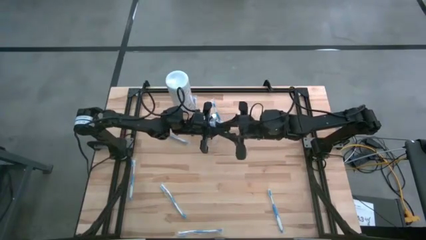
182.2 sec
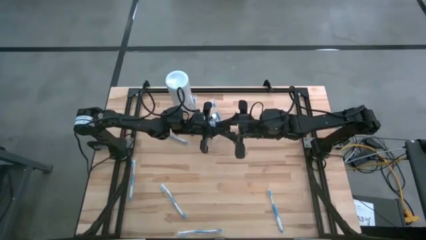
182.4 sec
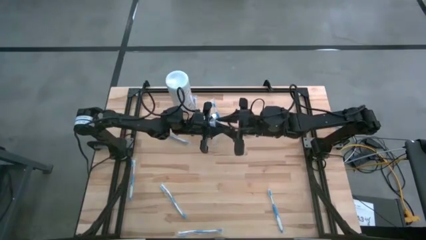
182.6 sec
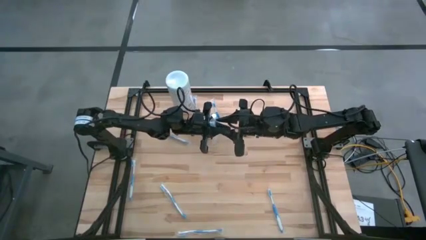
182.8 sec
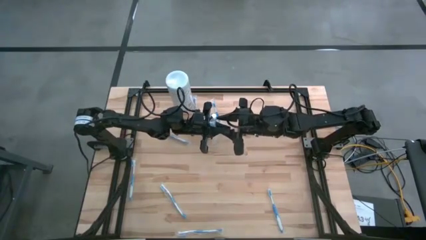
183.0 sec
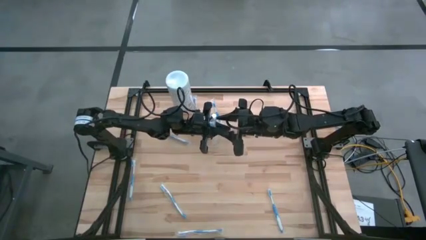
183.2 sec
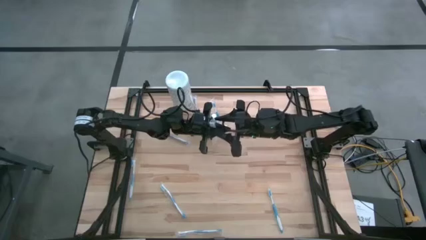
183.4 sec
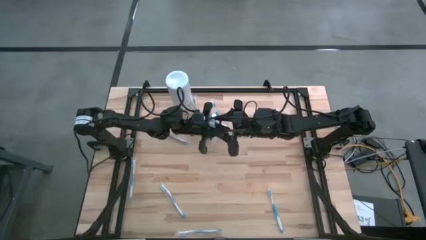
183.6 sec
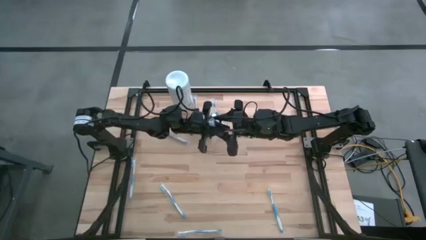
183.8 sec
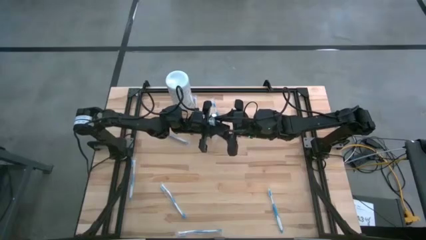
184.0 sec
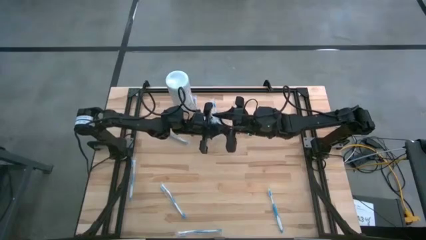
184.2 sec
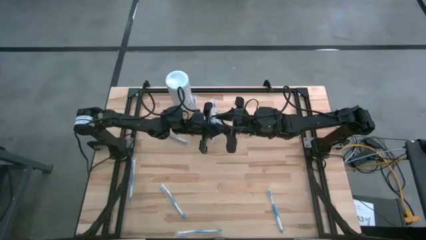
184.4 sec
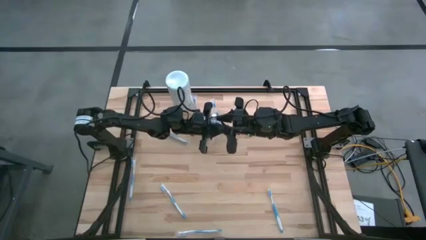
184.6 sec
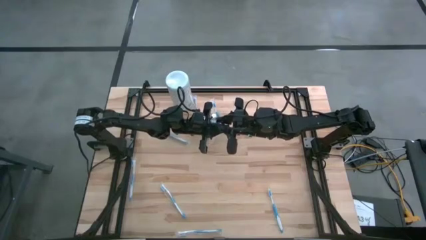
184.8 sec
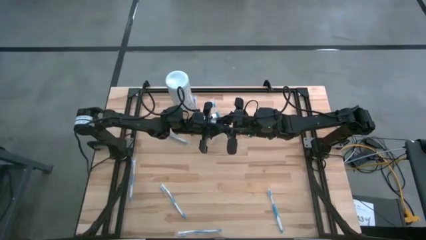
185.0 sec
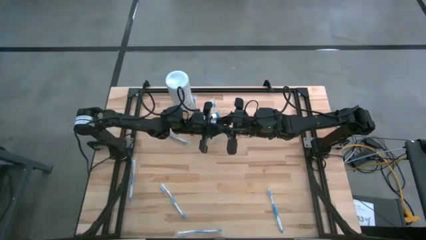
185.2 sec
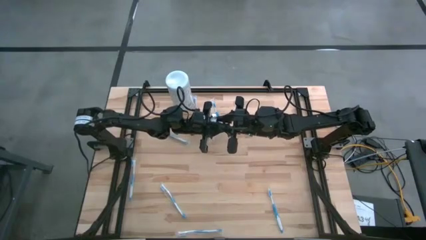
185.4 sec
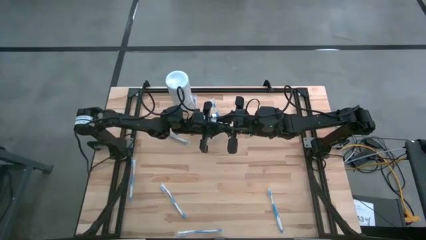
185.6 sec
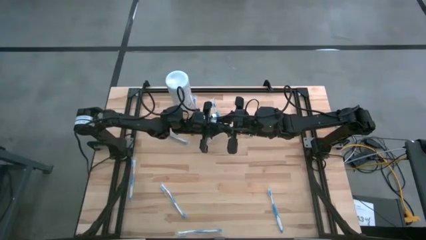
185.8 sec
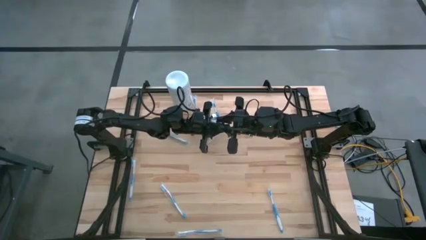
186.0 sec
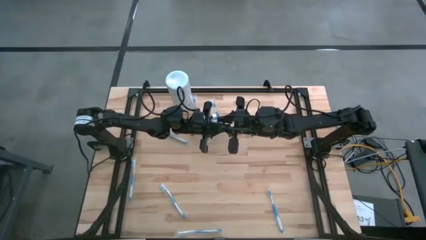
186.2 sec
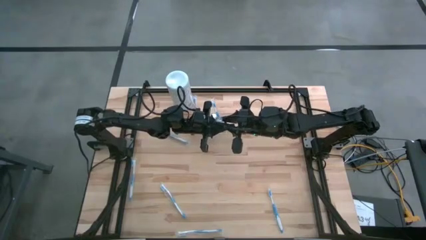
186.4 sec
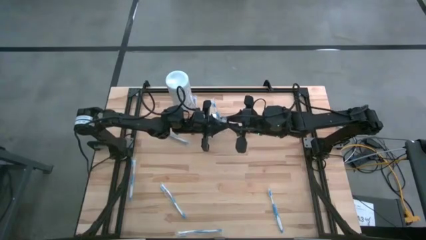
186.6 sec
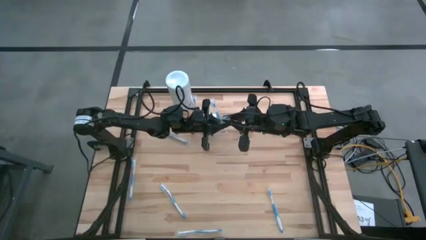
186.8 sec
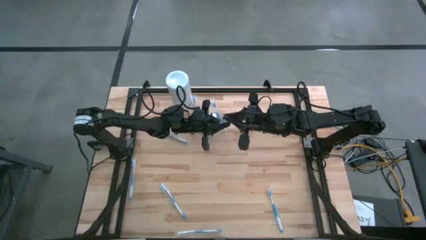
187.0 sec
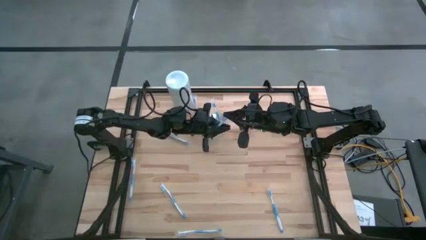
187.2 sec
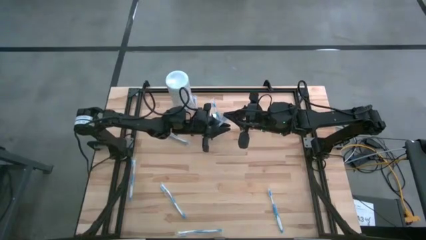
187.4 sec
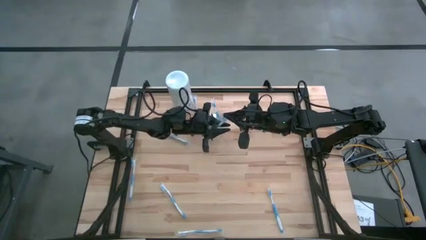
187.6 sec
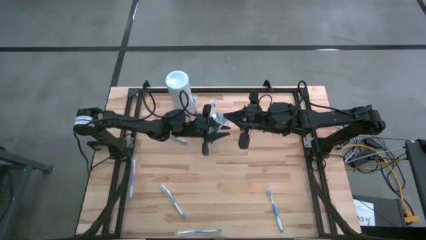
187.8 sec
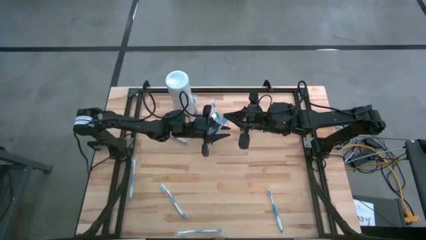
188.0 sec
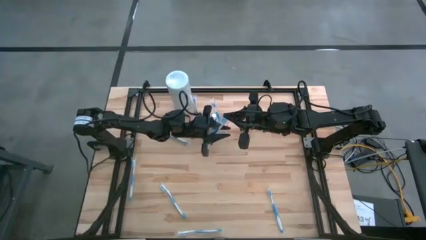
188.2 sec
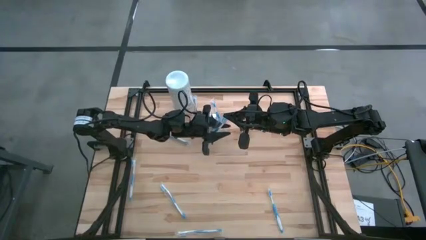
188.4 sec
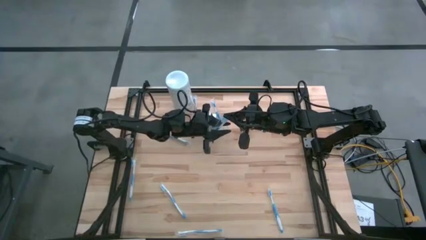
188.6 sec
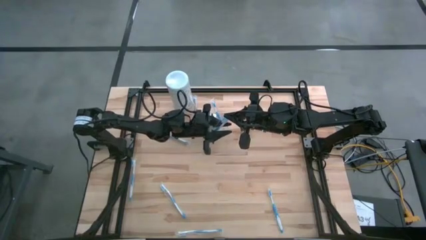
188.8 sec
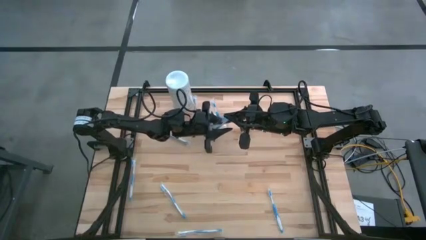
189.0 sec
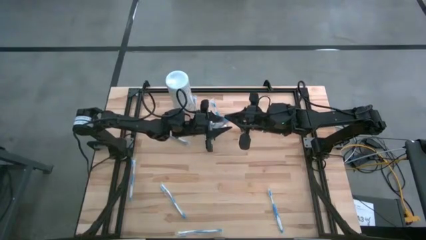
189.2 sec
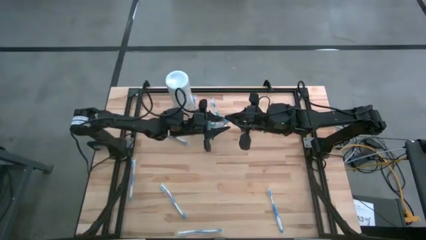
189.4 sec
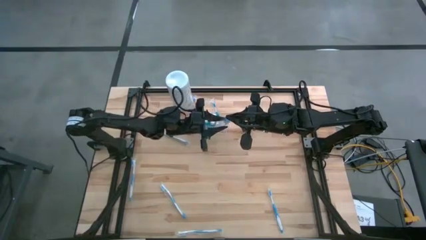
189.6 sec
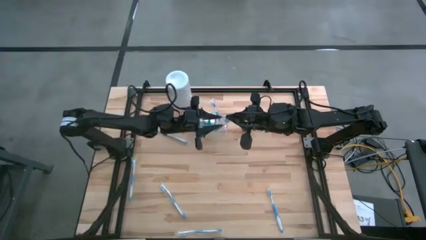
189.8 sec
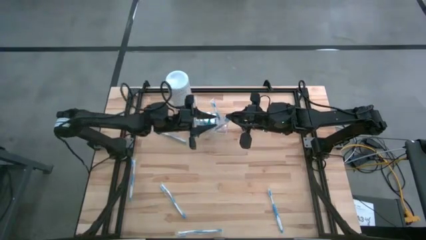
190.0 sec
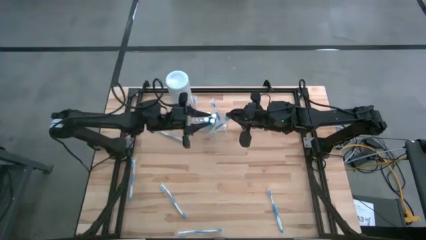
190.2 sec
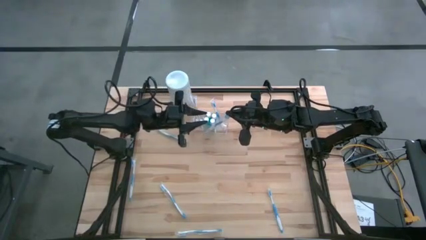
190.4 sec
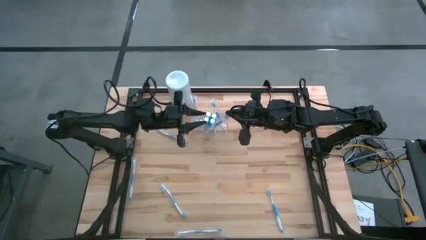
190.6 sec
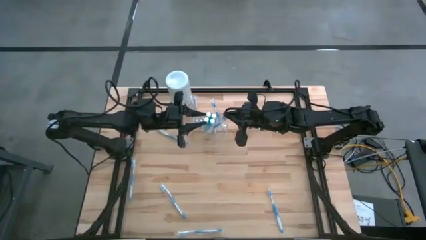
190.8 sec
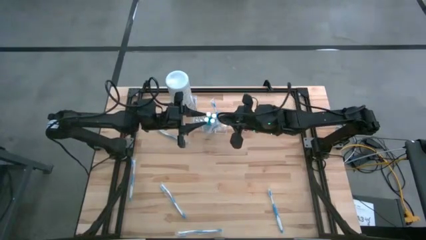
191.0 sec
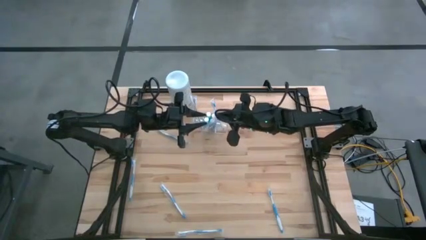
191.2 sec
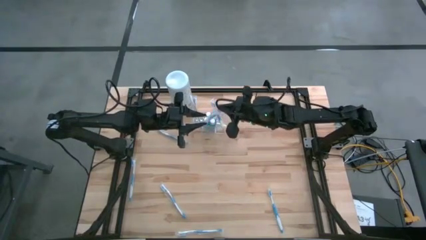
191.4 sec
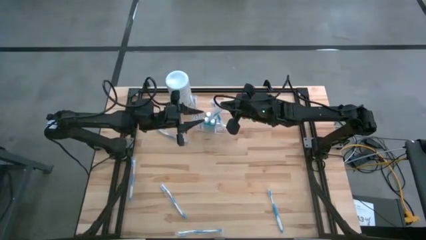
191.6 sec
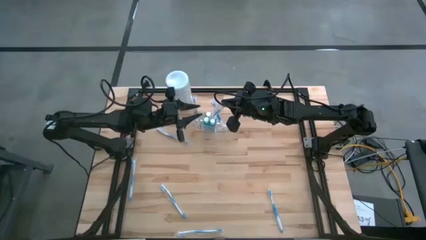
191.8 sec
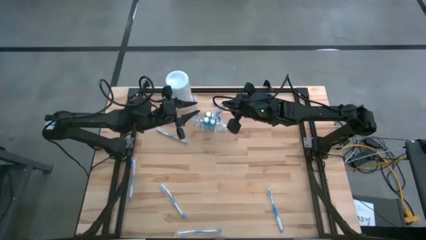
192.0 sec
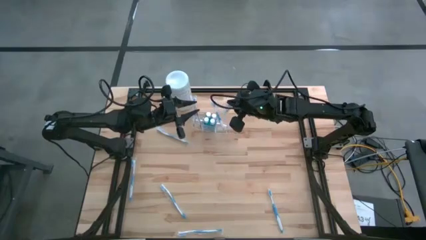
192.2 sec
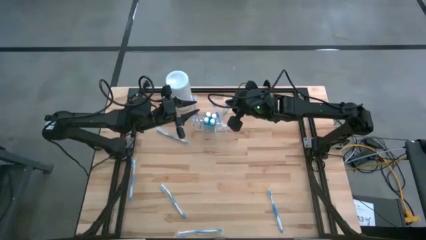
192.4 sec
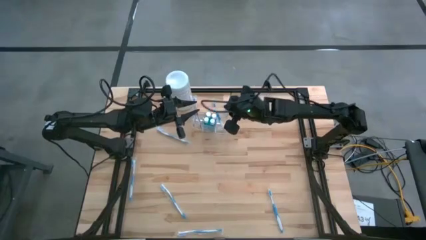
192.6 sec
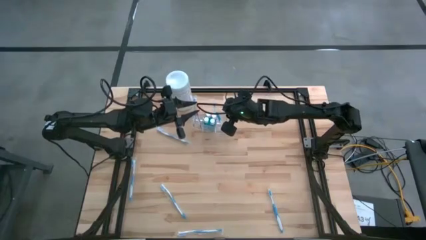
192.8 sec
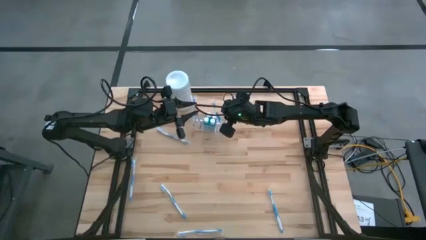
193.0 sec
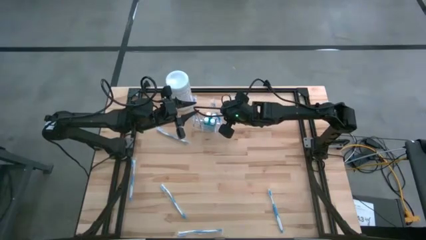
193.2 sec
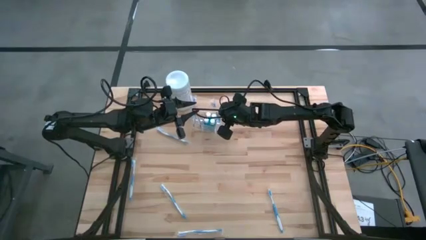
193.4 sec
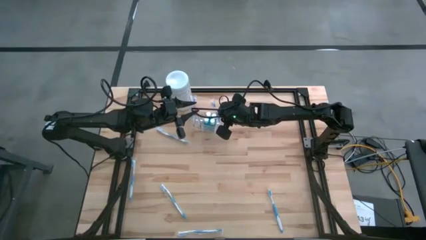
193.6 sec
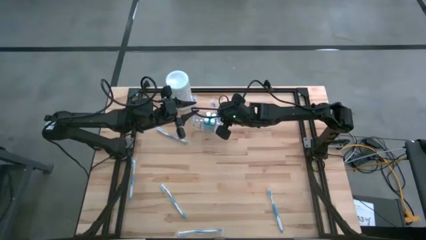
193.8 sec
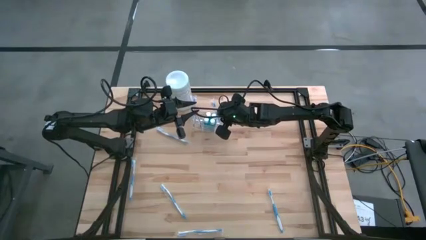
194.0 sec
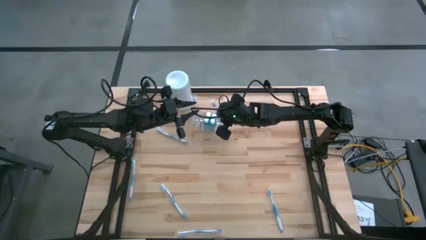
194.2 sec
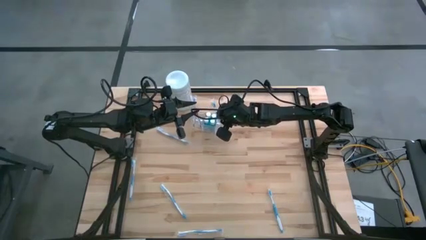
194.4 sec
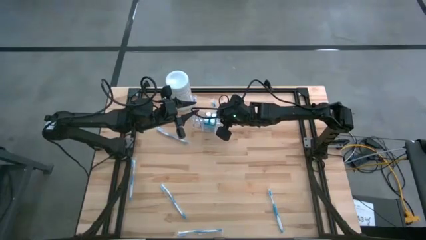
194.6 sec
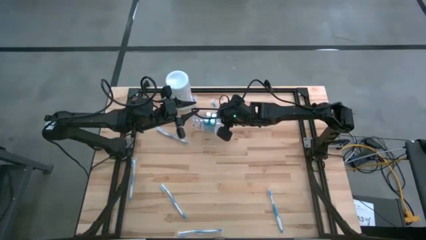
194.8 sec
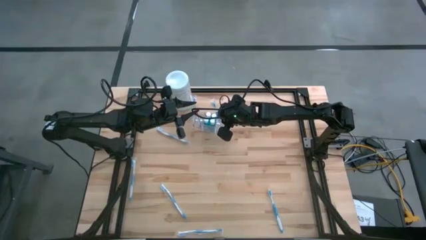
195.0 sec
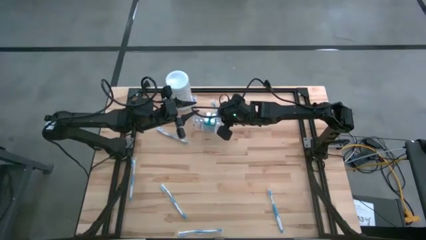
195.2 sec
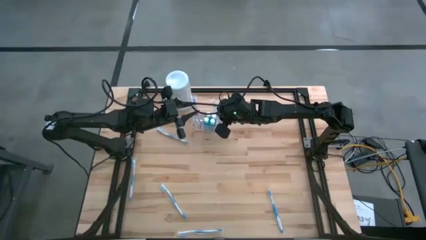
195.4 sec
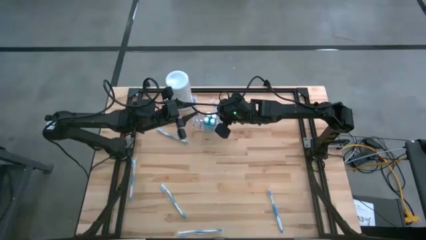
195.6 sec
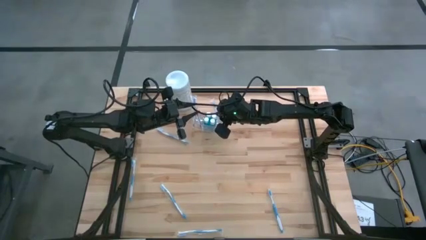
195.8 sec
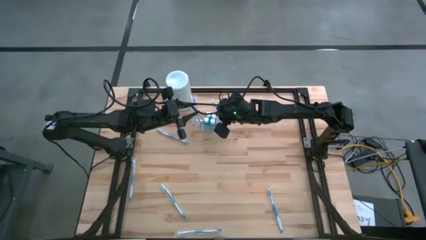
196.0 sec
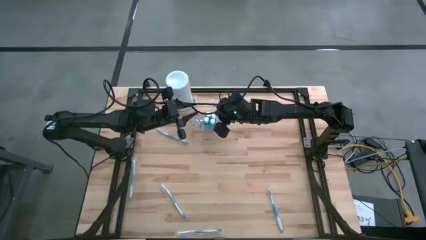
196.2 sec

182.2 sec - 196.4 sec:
Task: Pick & Place toothbrushing station
Put the blue toothbrush into the right of the transparent organizer

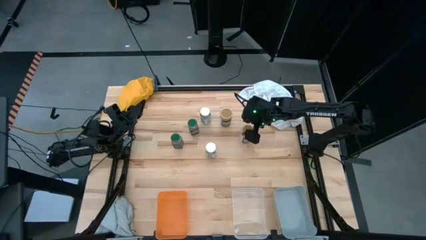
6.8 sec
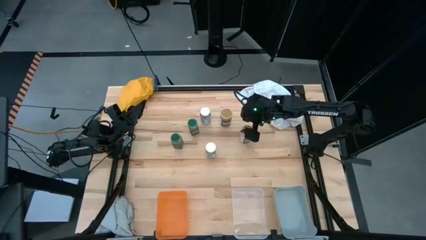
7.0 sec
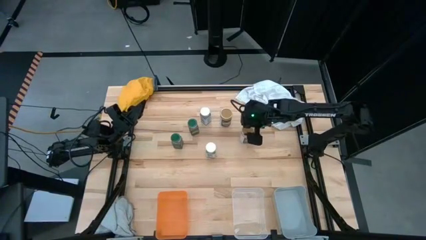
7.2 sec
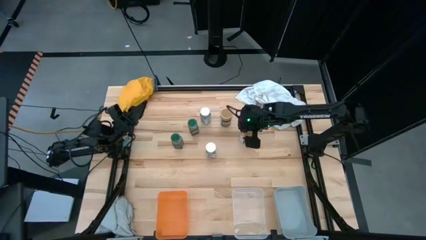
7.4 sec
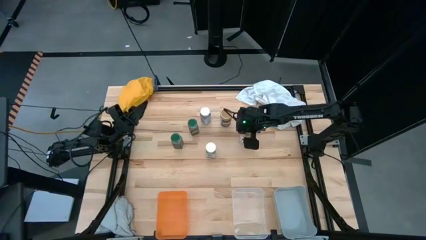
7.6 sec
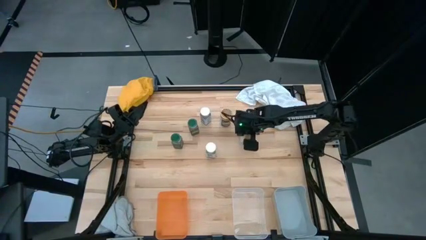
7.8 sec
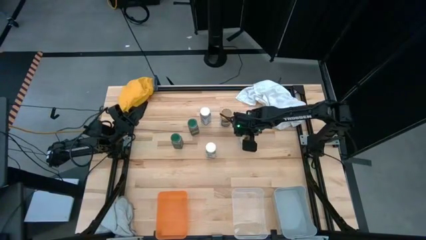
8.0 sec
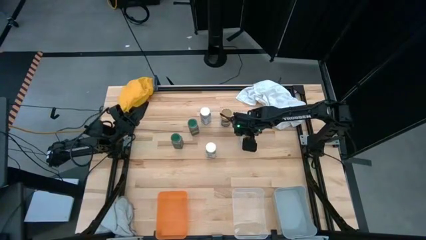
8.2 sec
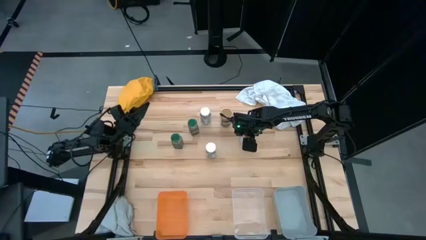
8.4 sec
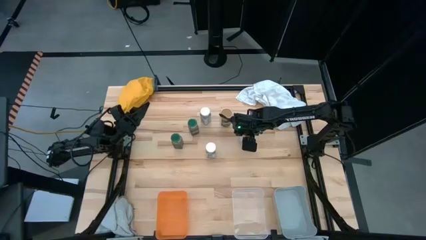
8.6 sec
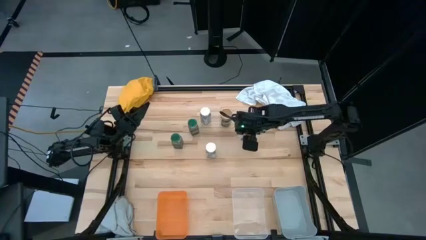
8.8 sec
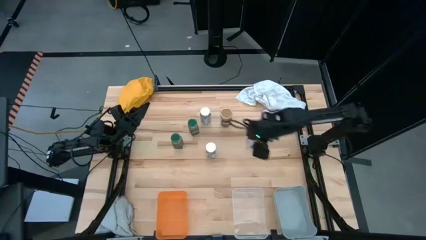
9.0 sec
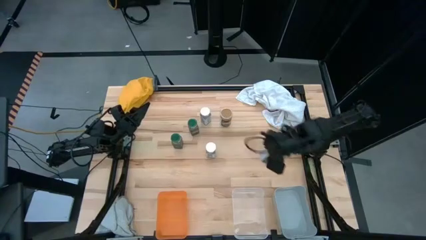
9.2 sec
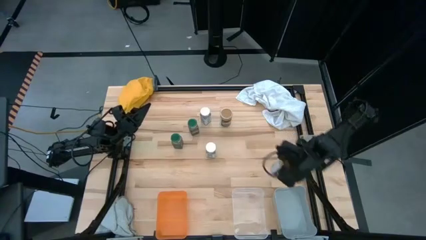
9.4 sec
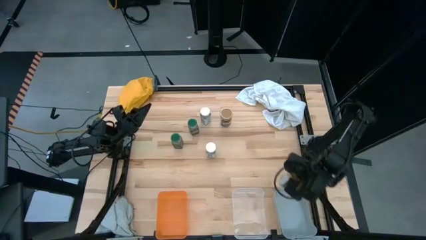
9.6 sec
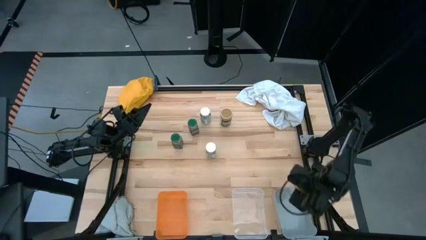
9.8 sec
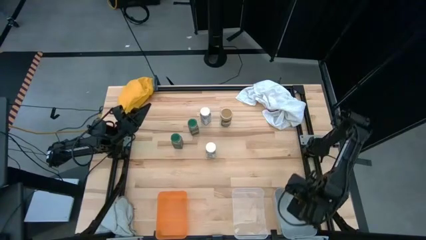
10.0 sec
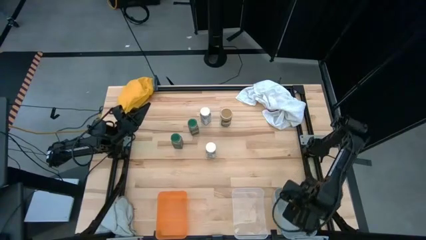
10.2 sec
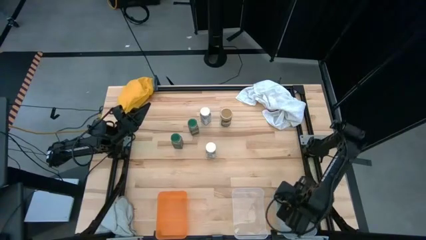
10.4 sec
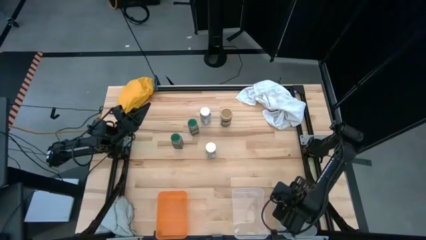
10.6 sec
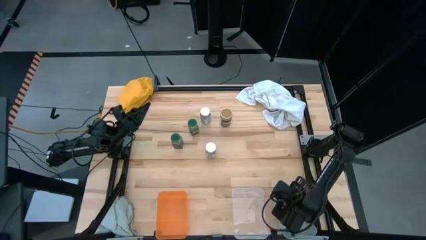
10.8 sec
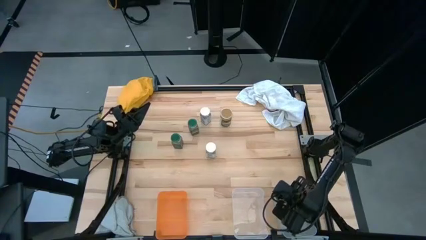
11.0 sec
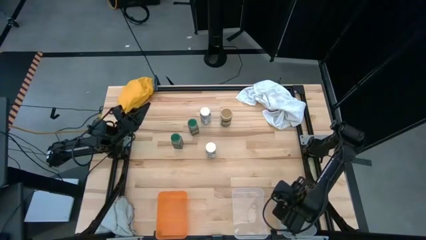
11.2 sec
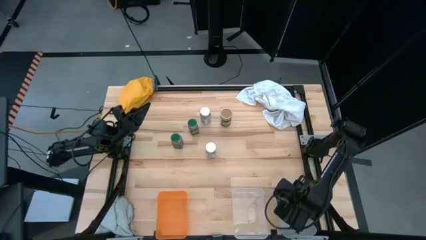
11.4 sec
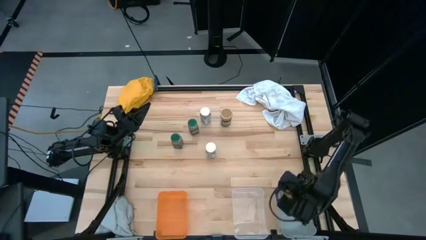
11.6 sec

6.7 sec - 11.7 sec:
Task: Sort spices by type
Put the bottom brown spice bottle into the gray bin
